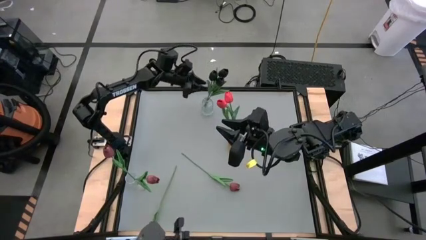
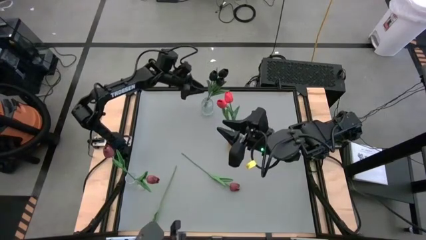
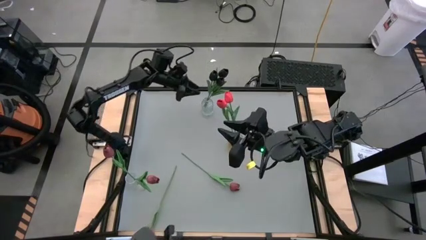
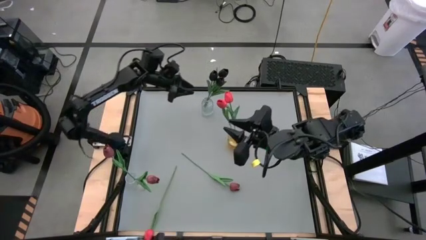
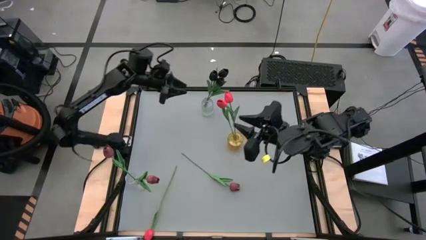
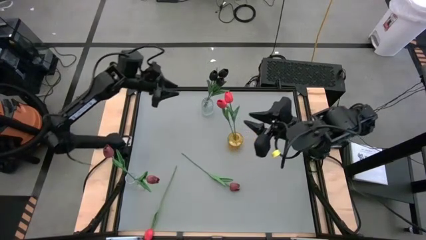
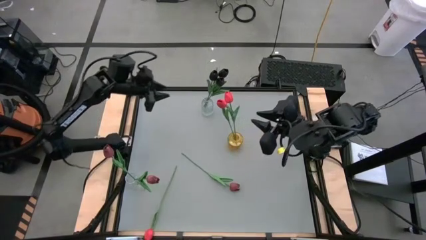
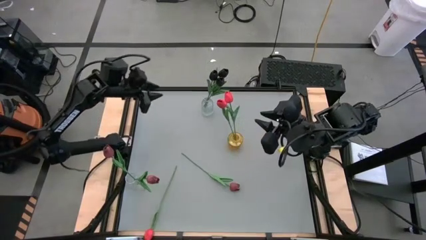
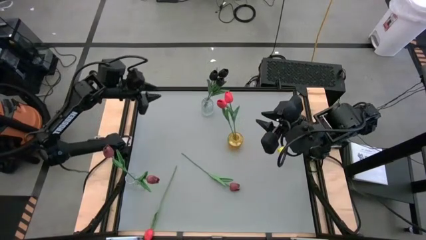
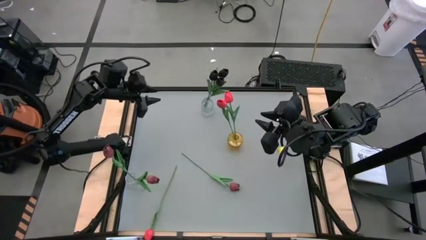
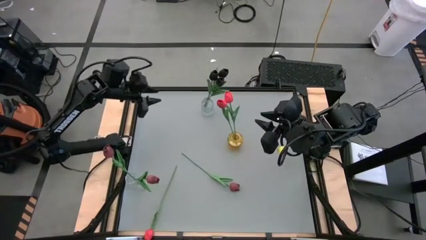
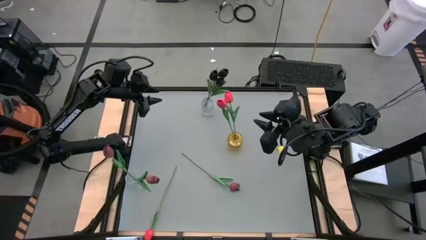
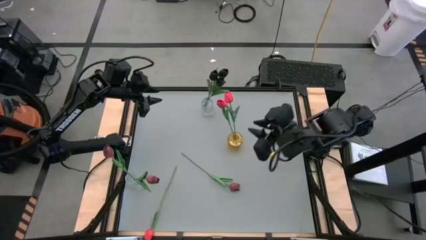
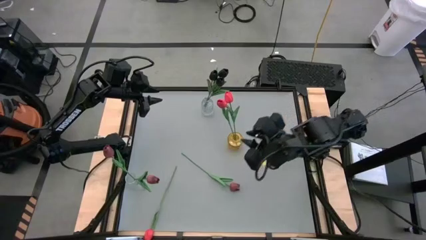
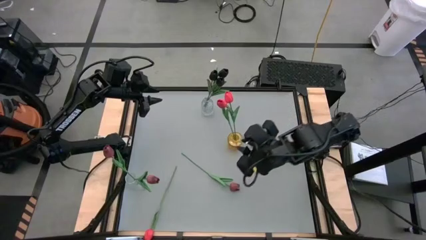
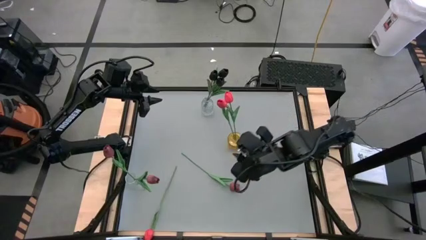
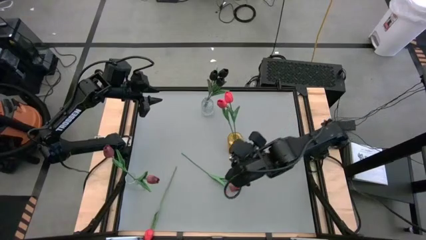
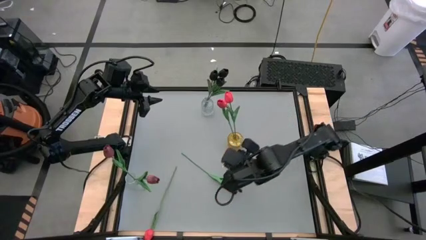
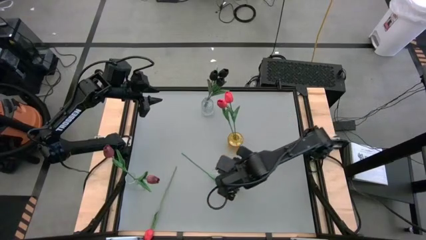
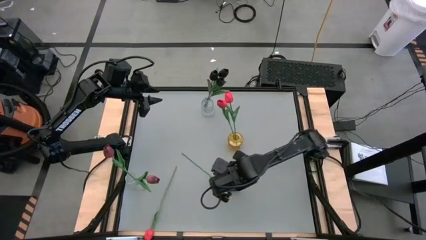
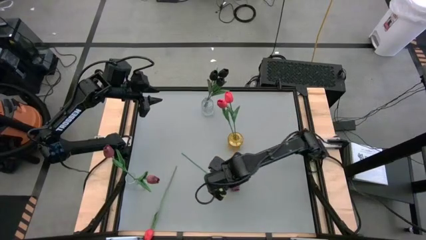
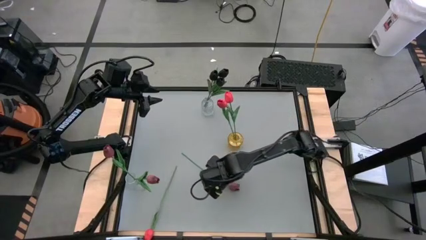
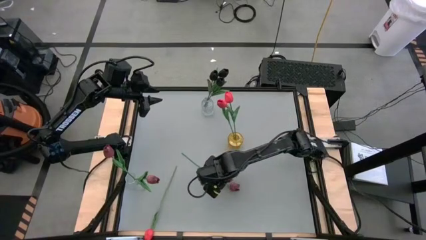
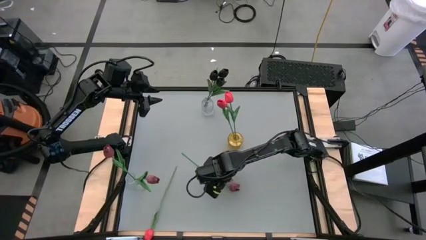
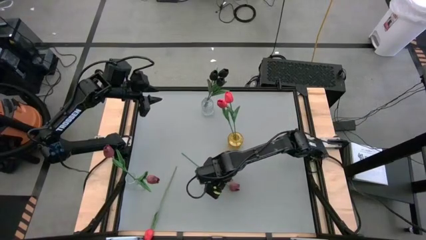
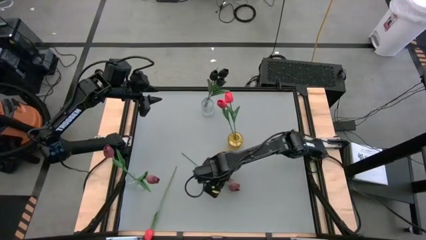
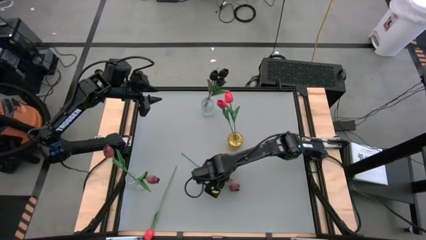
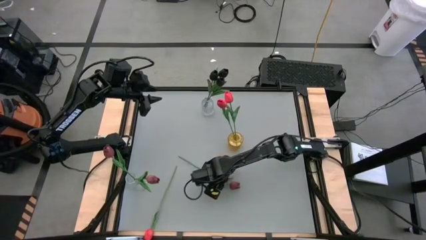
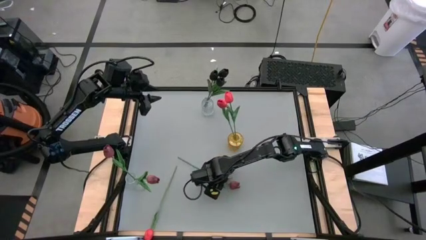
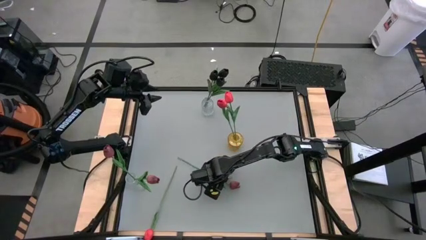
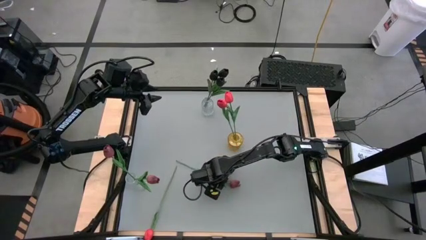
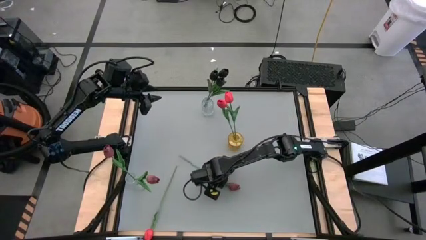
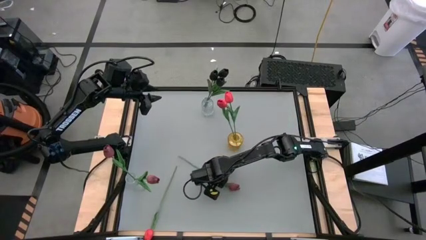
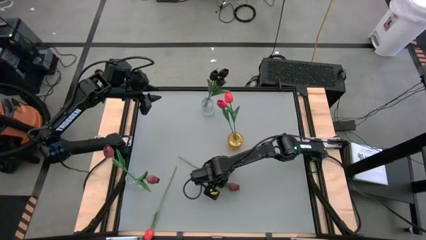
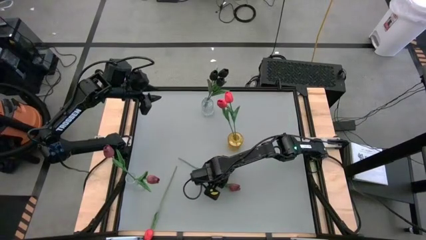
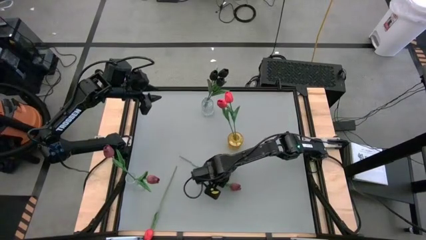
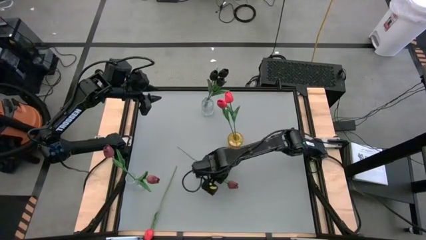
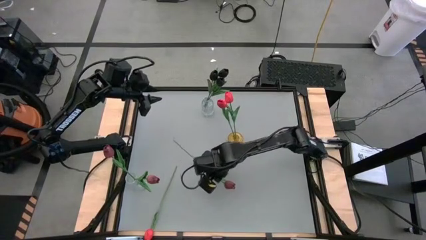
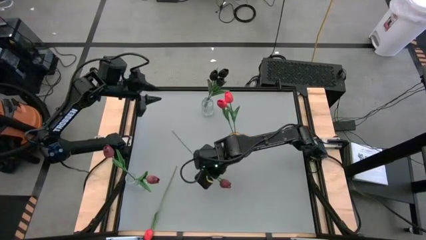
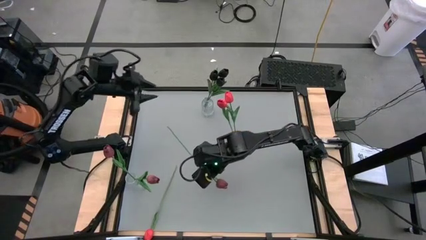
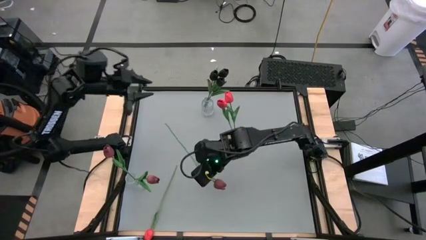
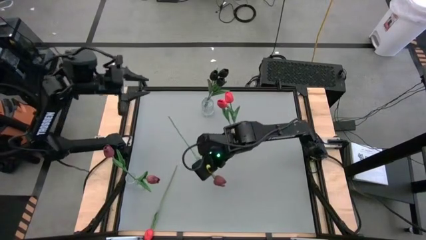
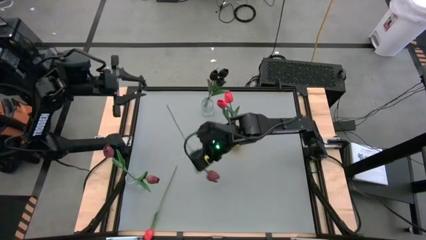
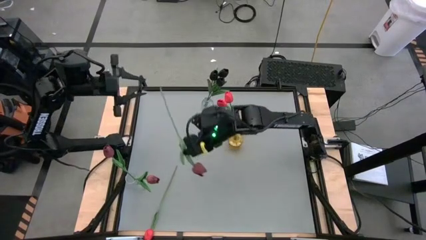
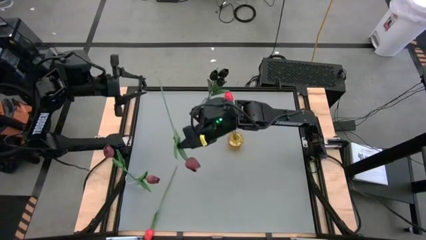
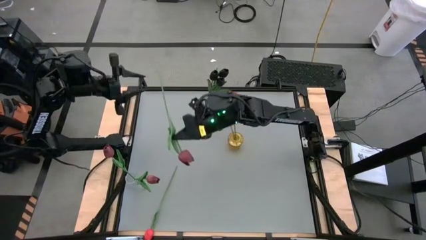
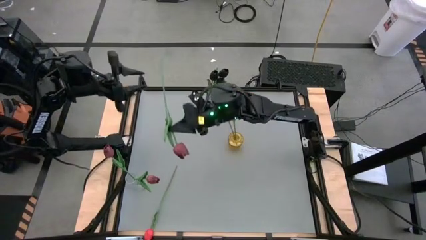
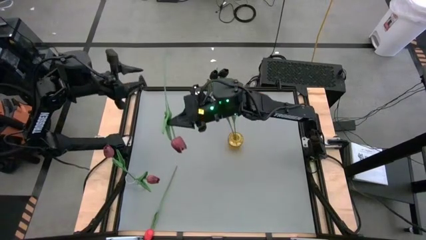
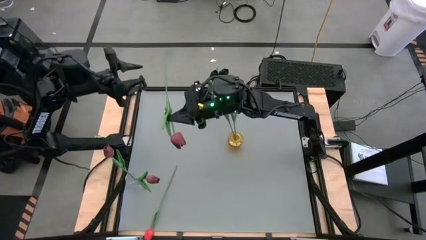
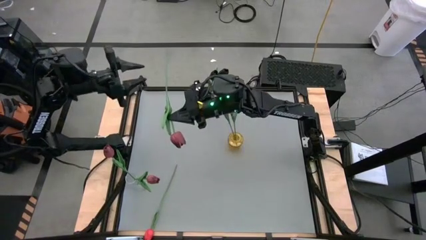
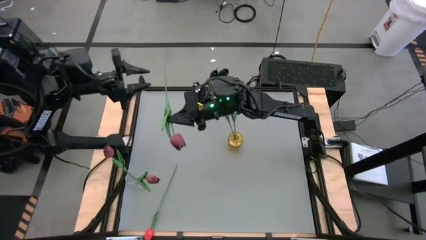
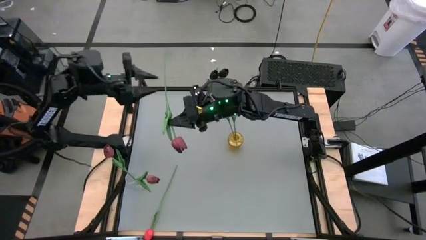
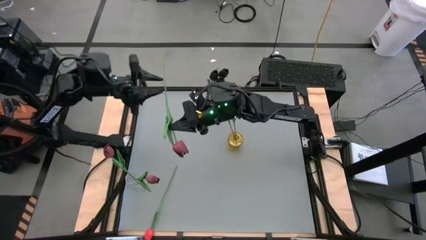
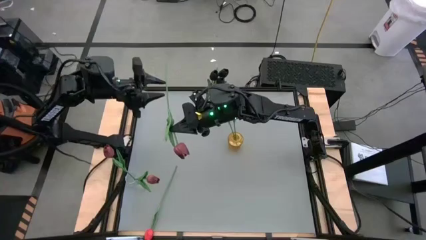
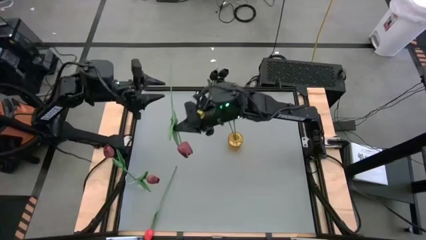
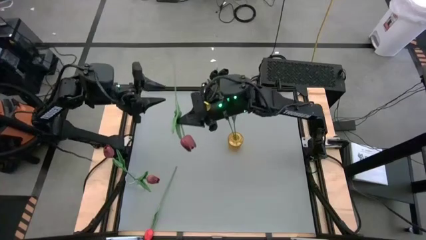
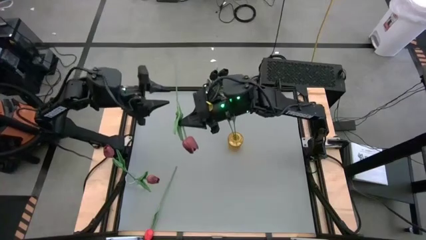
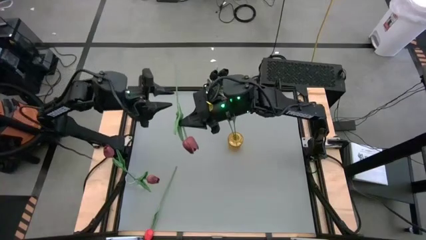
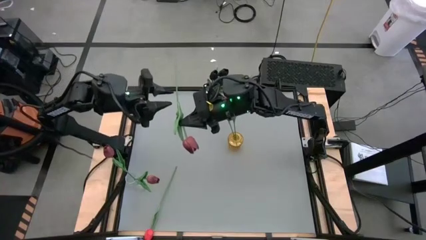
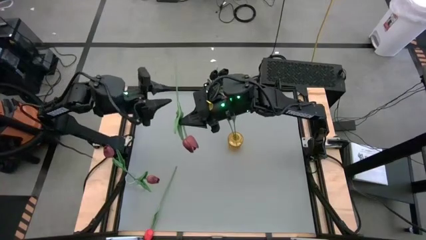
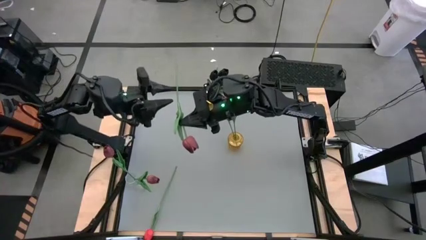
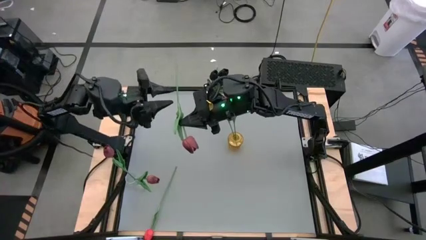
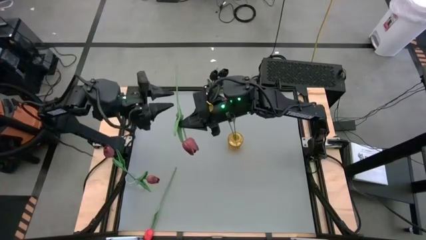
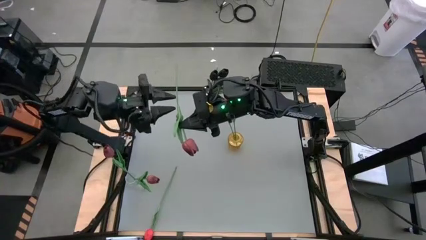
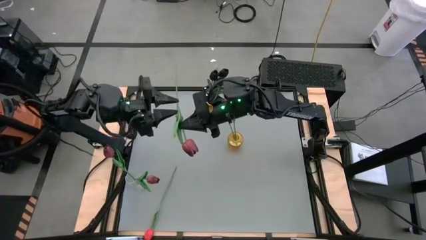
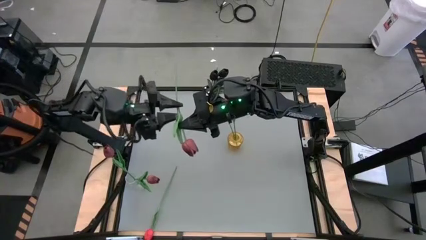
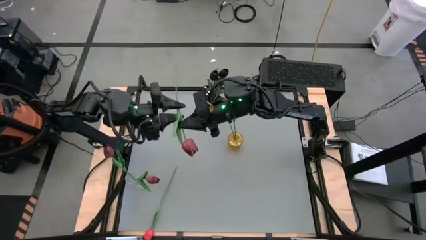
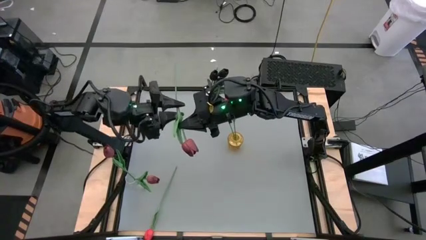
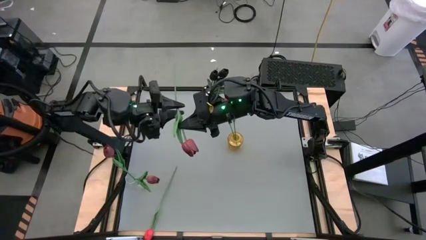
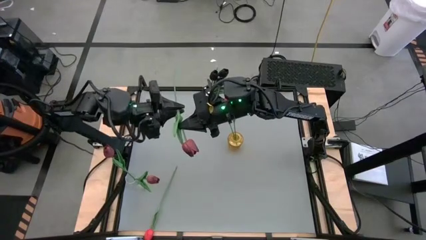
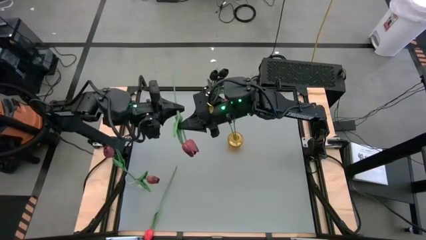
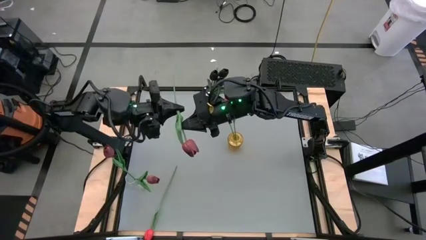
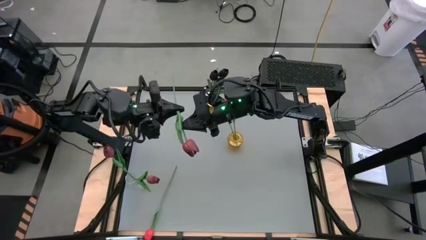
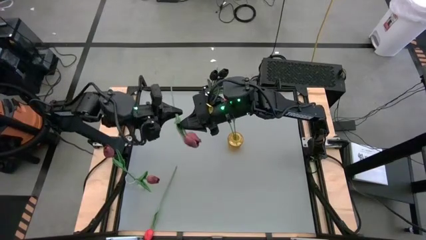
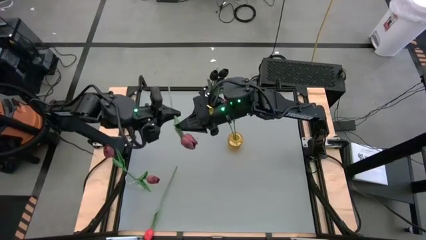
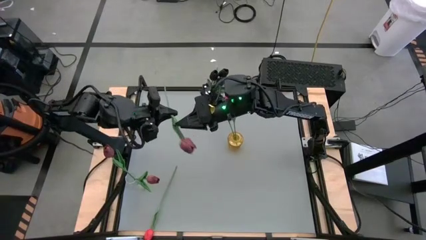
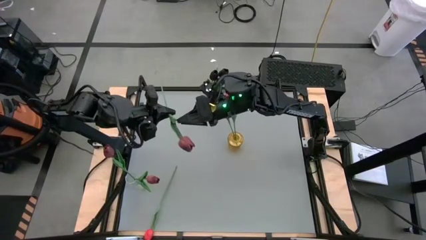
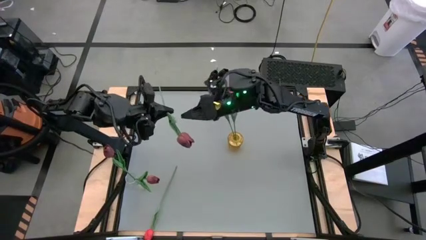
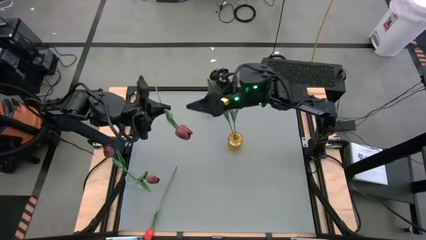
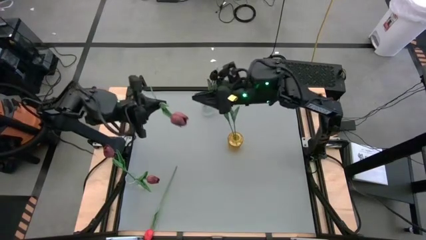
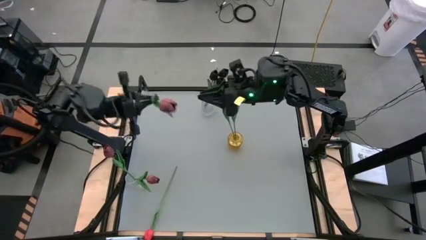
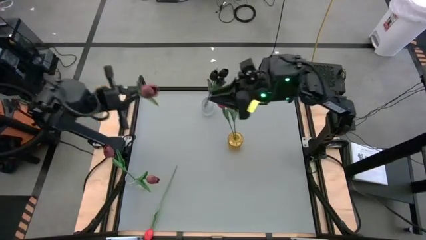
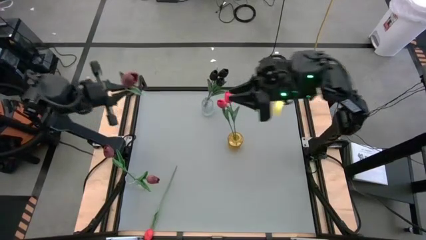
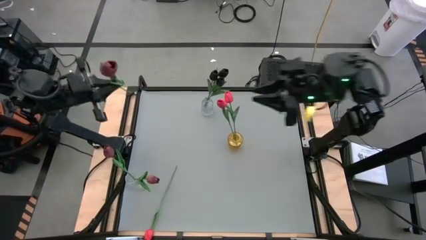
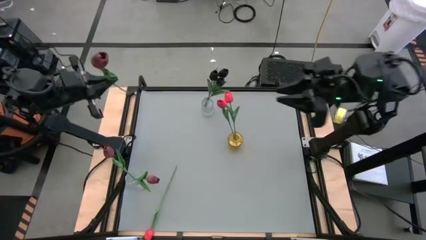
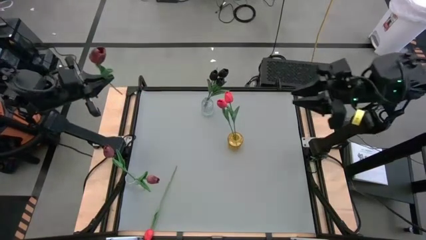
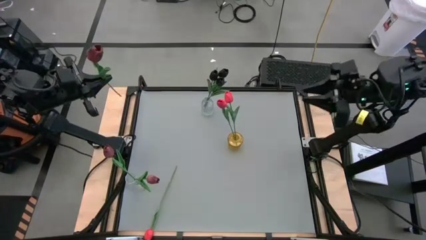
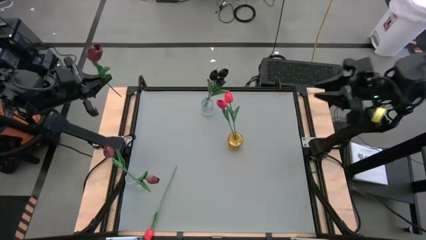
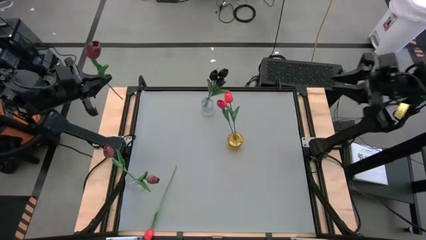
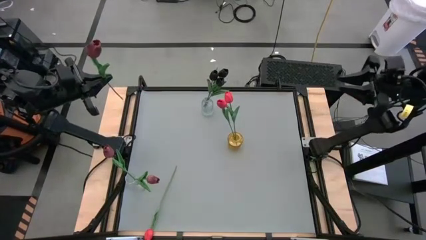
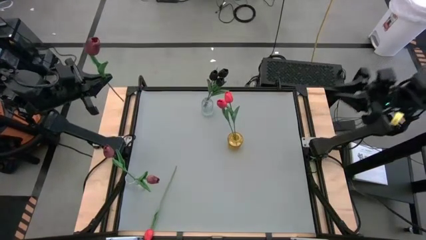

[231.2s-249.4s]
Task: Sort flowers into vase by color
Put the red tulip into the bottom transparent bin
